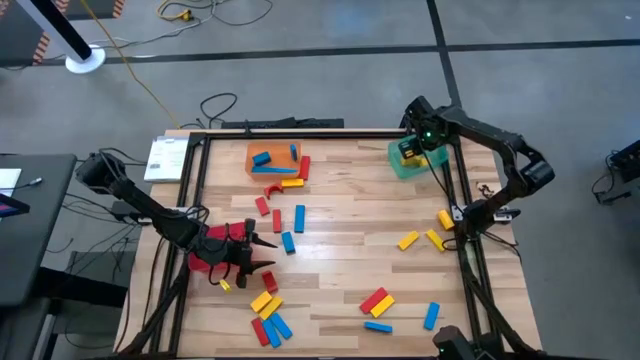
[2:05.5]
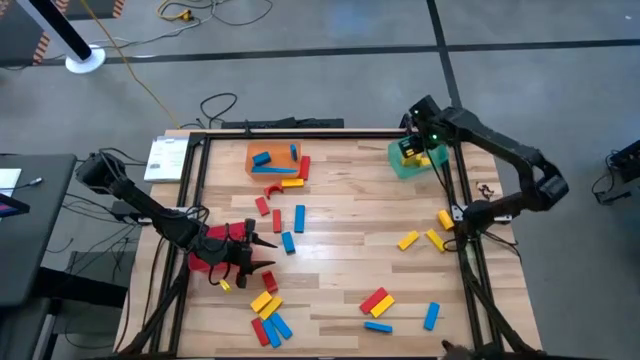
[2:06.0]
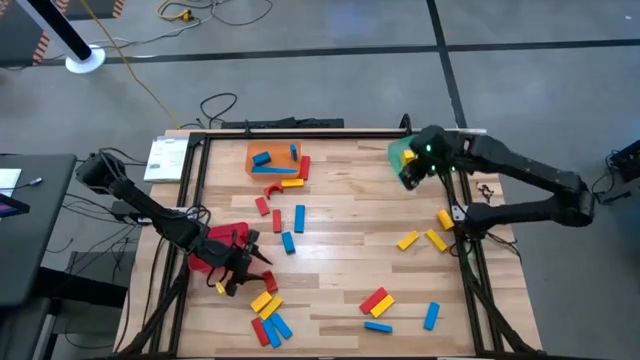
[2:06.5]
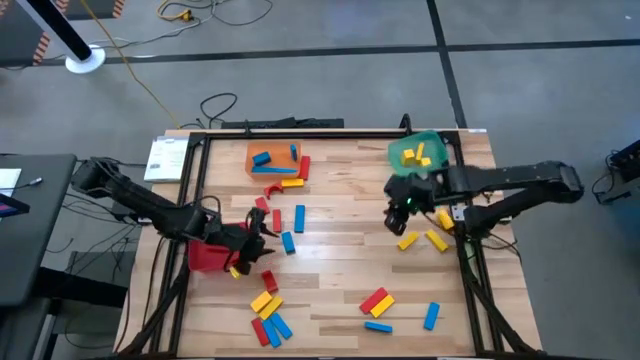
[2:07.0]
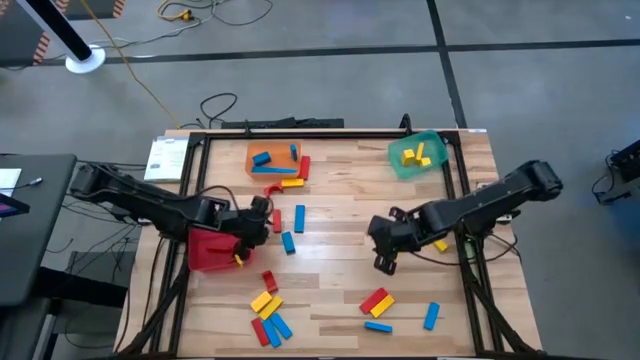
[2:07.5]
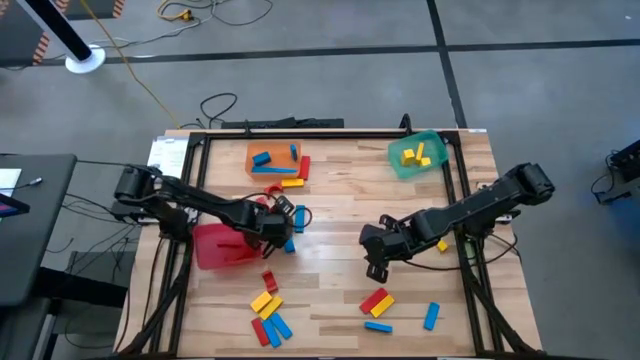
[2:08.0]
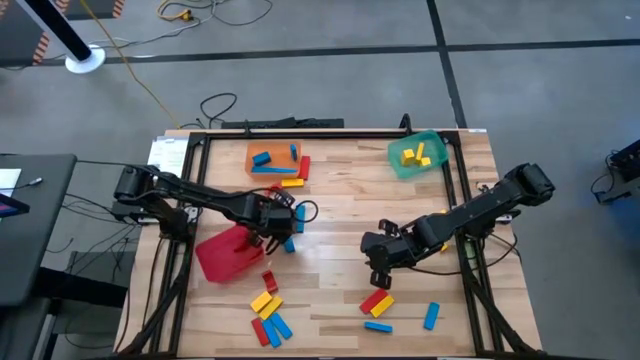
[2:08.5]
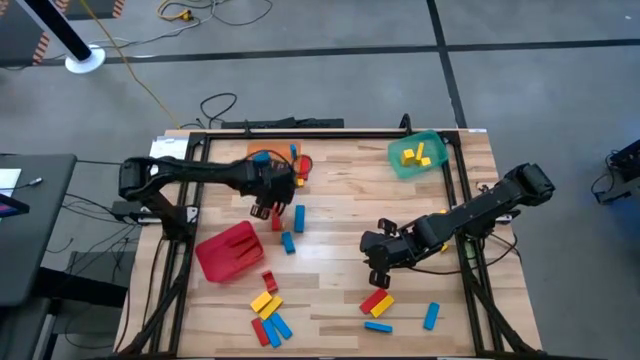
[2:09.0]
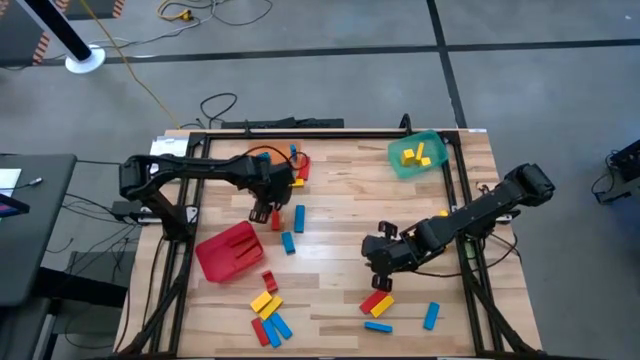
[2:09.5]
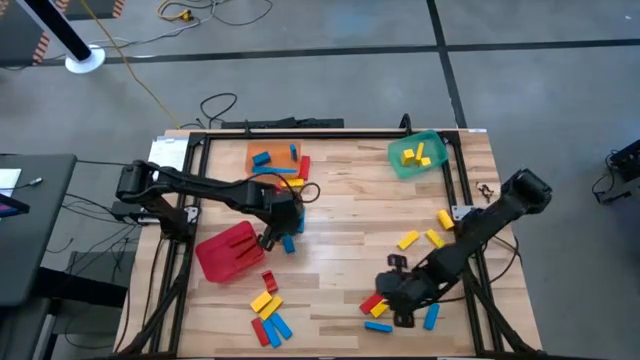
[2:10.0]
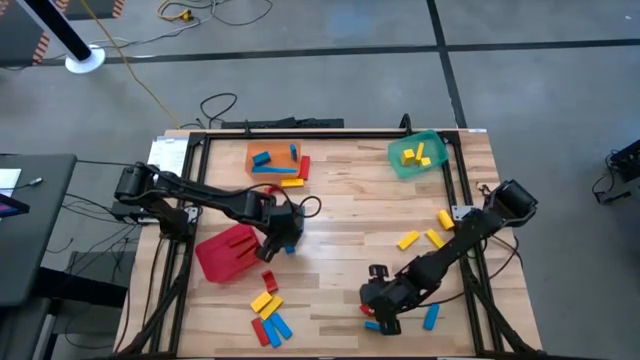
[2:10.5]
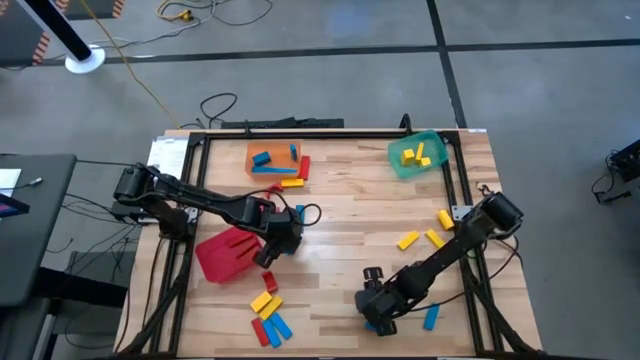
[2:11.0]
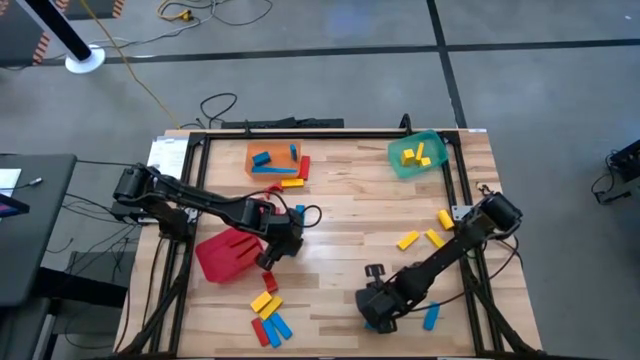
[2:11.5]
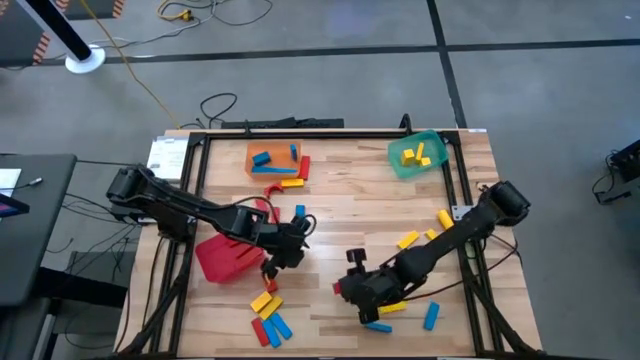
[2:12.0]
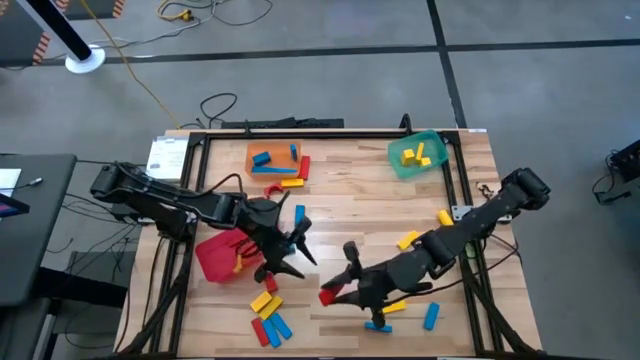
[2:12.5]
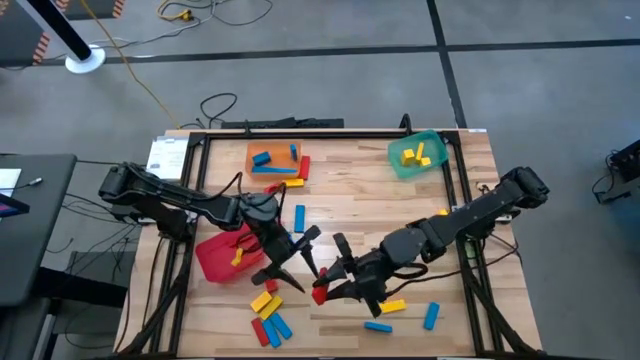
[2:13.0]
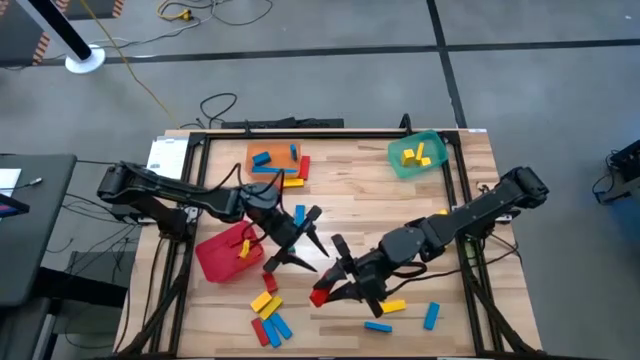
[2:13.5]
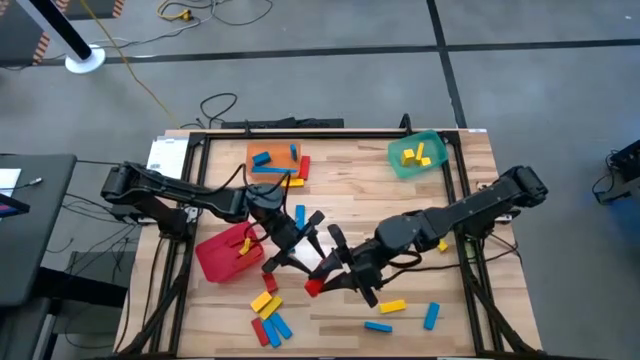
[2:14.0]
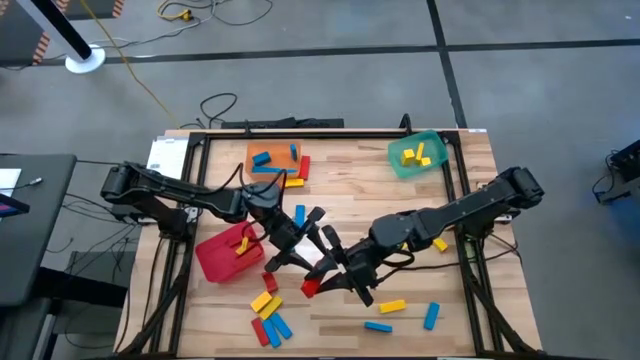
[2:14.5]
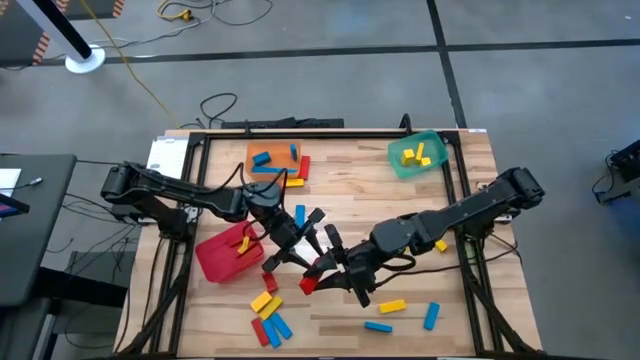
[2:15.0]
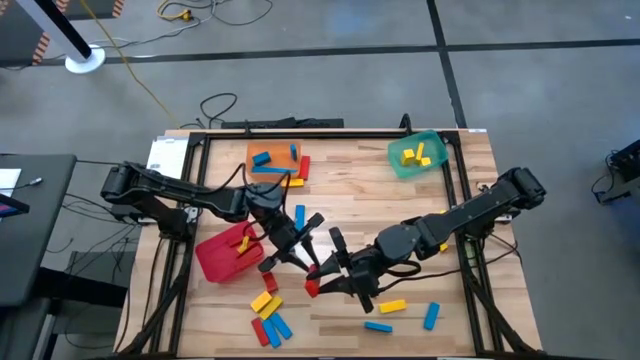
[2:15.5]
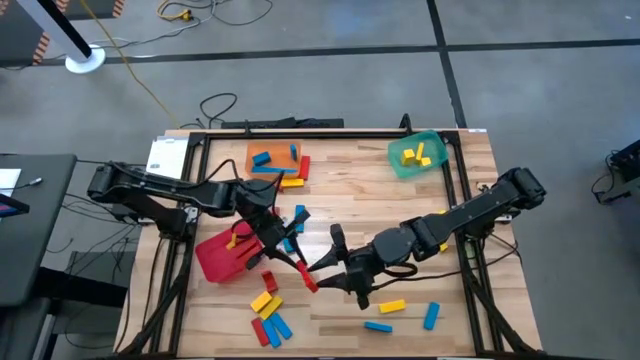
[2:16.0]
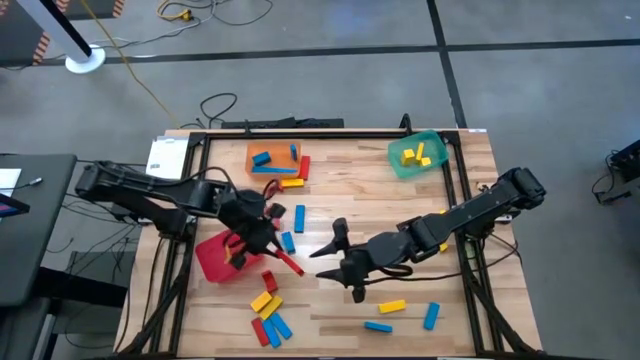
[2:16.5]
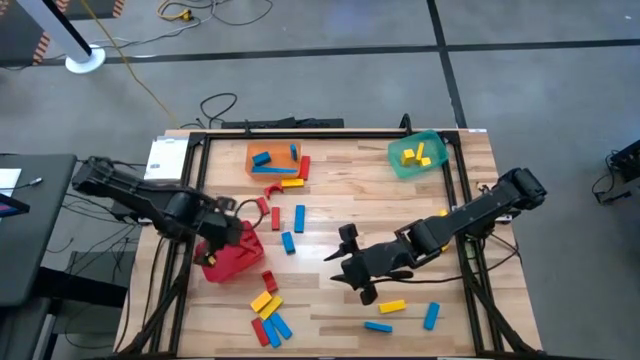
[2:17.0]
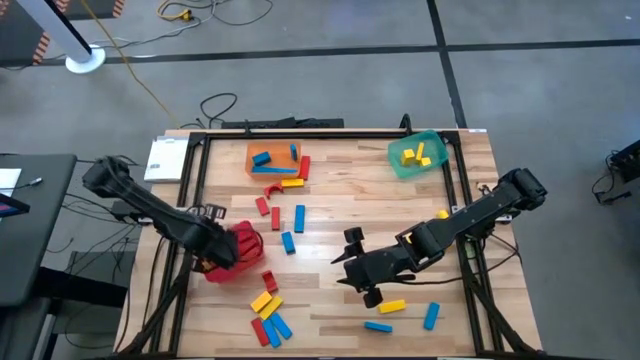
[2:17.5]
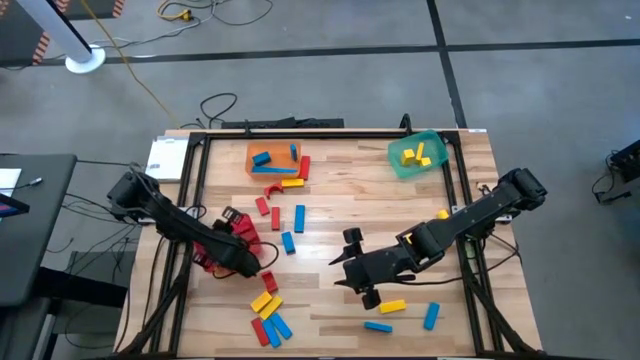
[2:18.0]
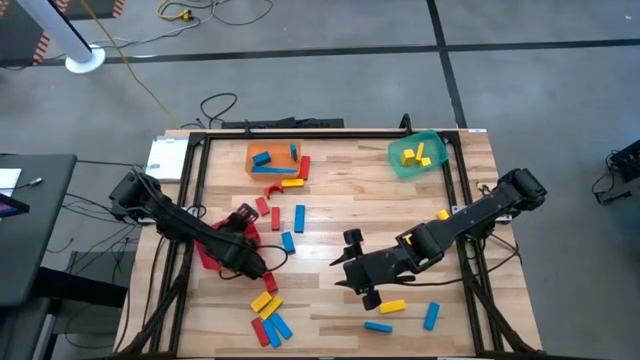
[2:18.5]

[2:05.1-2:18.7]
Task: Sort blocks
Put the red block into the red bin

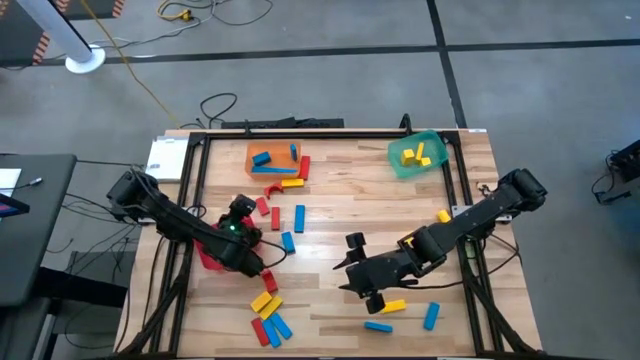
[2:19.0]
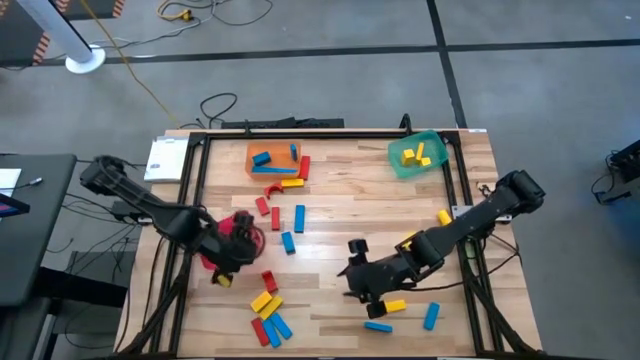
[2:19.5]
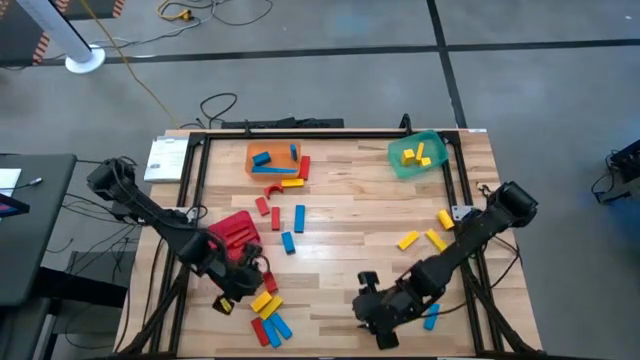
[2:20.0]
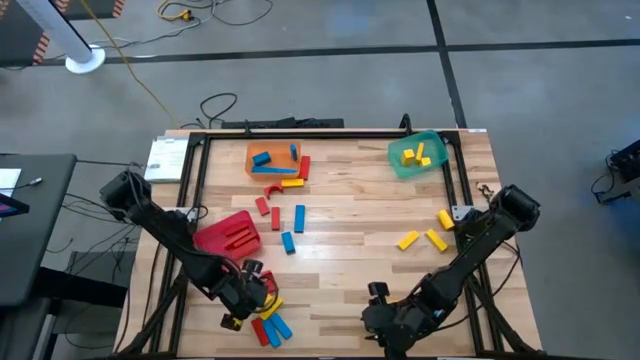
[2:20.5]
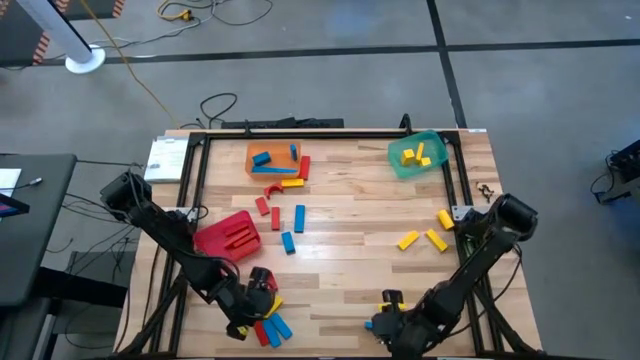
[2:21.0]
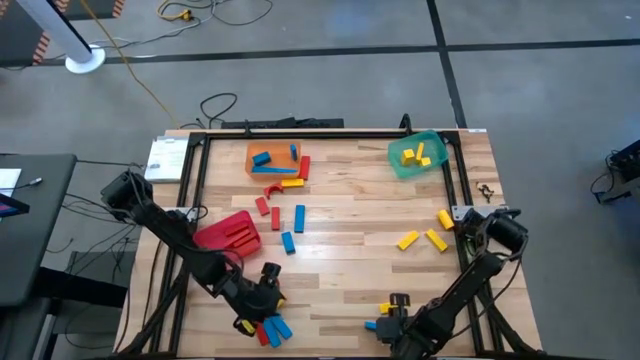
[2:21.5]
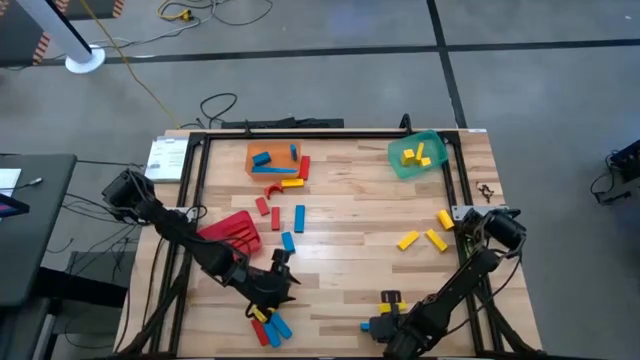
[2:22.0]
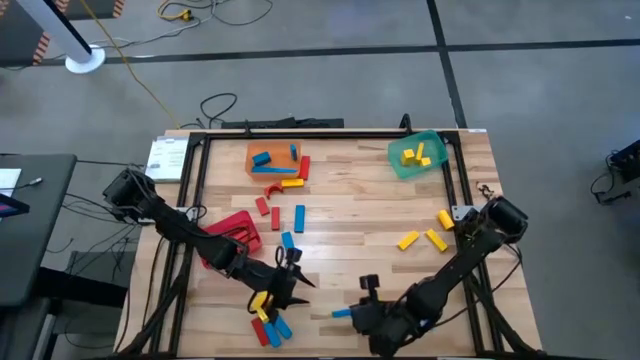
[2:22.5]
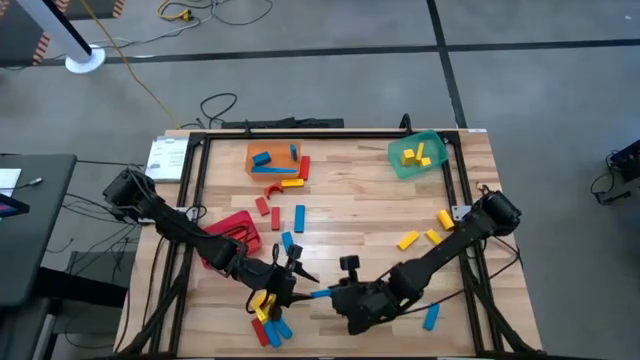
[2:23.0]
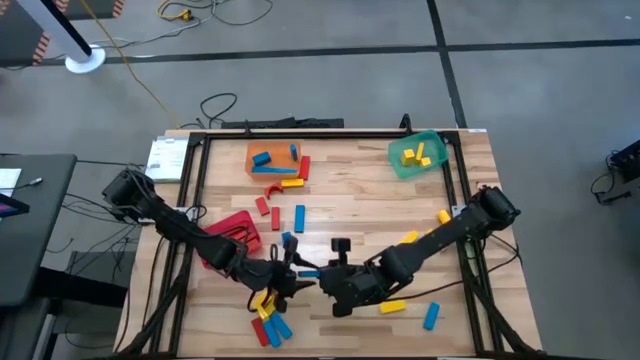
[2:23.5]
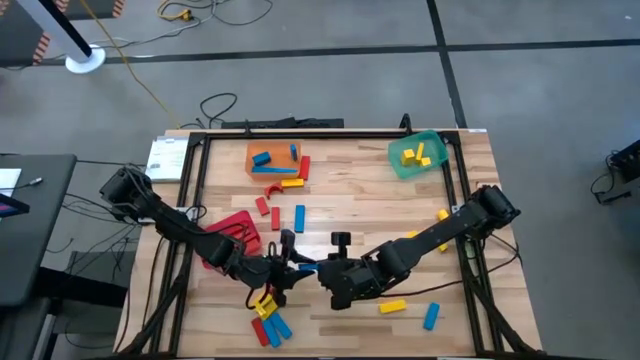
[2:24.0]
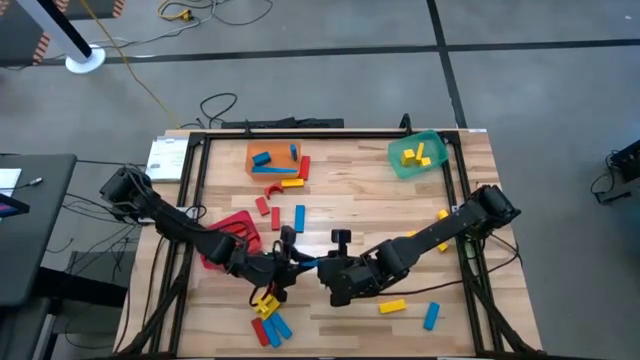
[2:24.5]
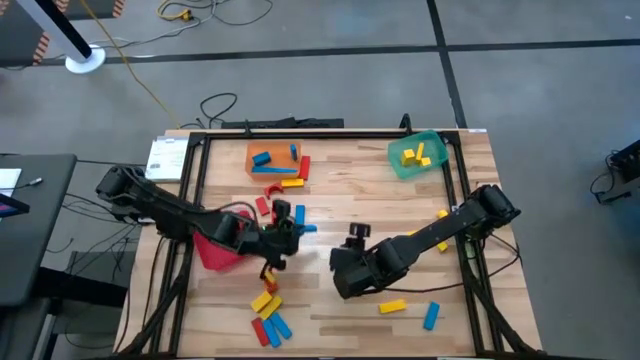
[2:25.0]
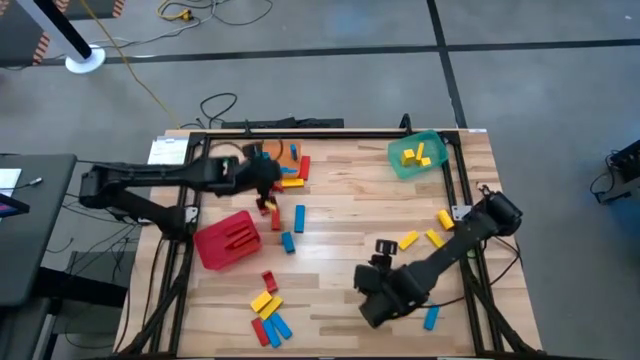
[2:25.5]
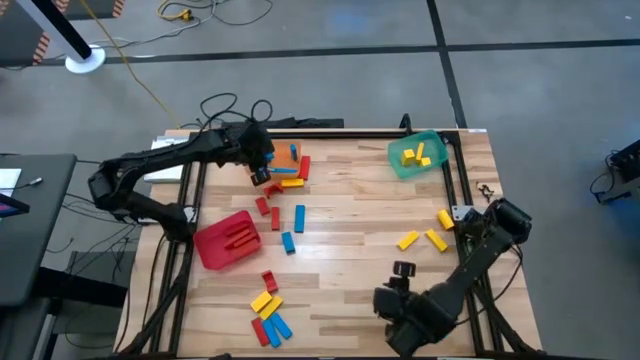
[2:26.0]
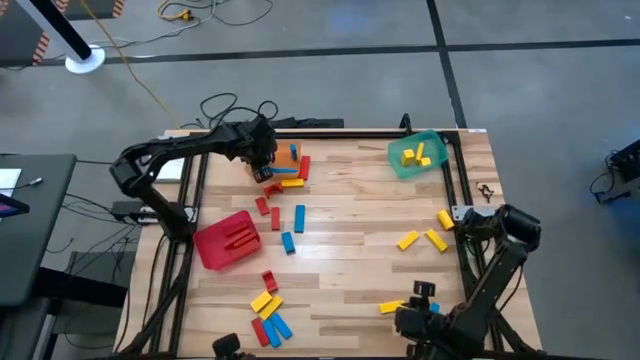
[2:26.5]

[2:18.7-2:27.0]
Put the blue block into the orange bin
